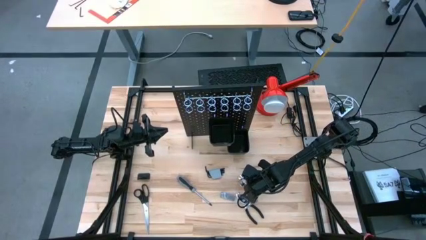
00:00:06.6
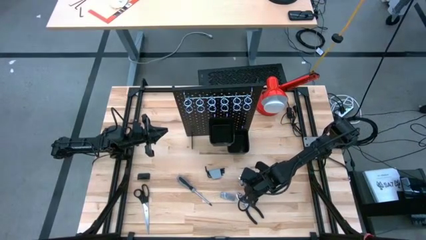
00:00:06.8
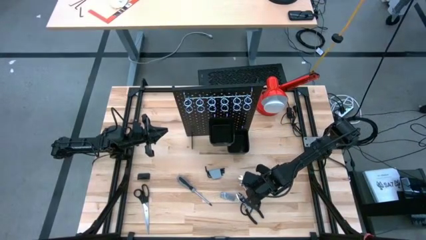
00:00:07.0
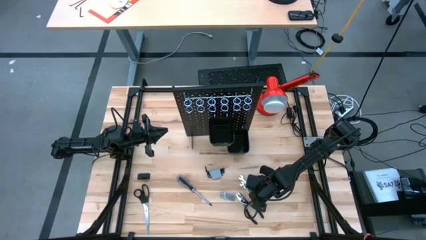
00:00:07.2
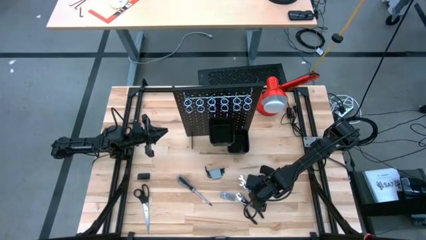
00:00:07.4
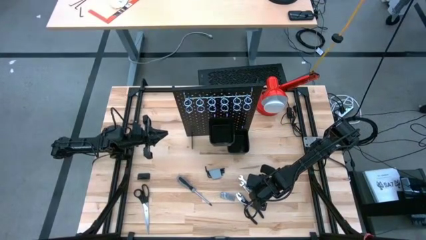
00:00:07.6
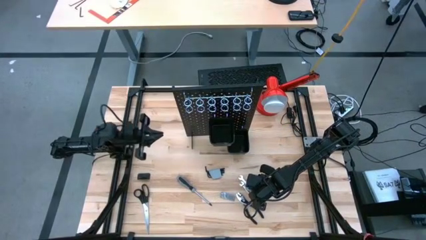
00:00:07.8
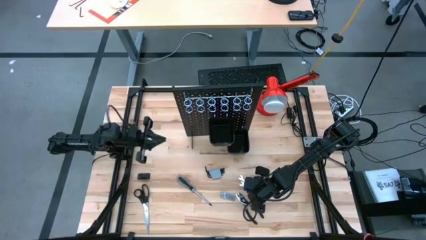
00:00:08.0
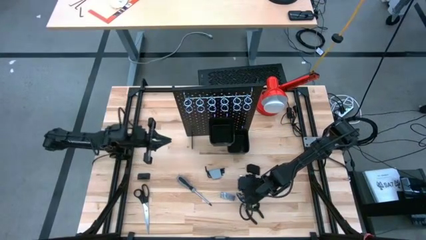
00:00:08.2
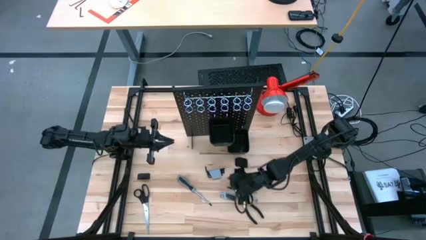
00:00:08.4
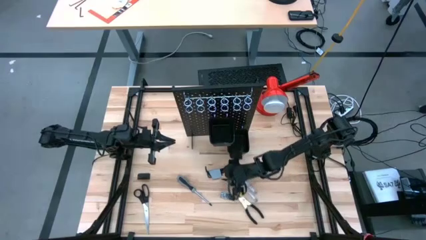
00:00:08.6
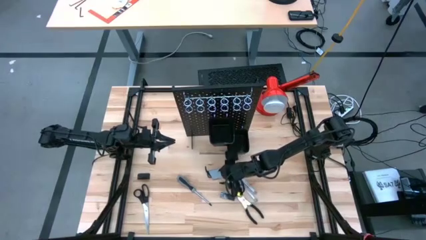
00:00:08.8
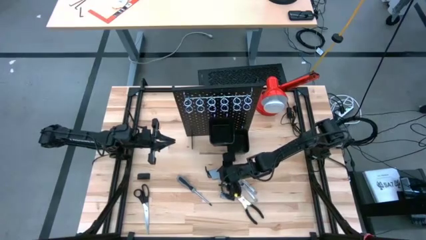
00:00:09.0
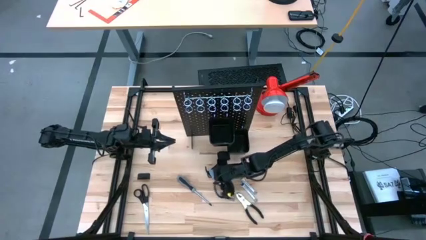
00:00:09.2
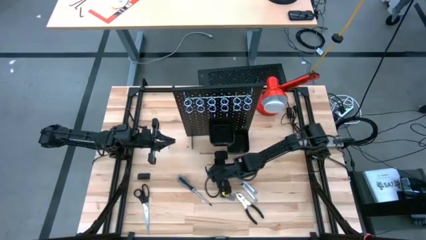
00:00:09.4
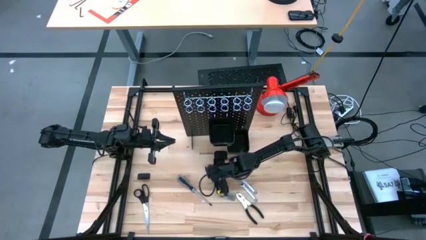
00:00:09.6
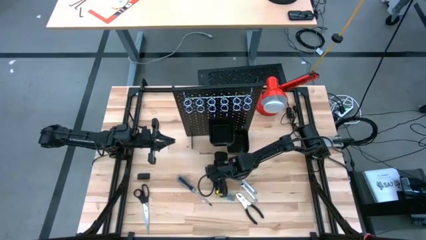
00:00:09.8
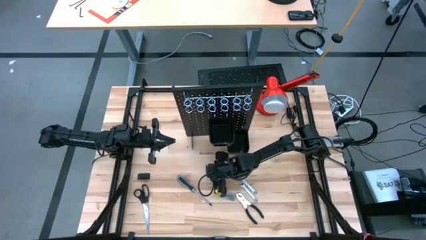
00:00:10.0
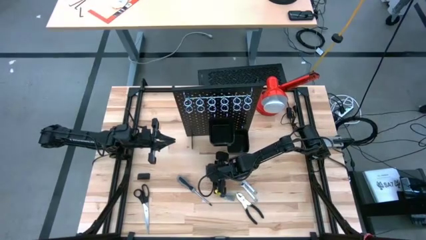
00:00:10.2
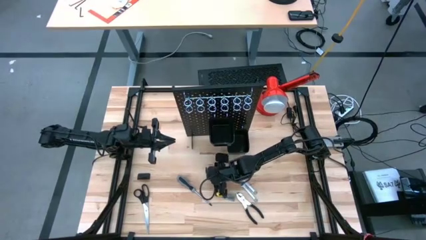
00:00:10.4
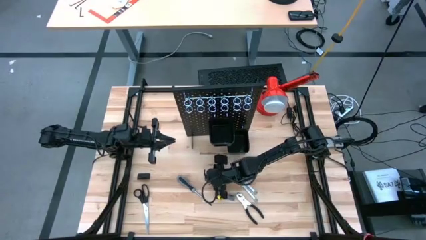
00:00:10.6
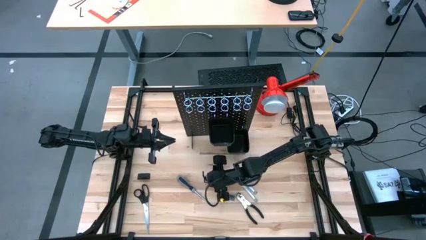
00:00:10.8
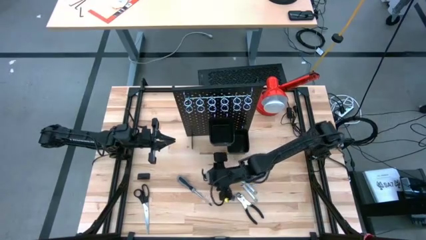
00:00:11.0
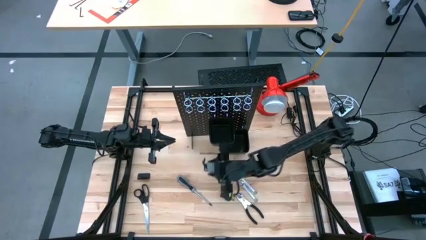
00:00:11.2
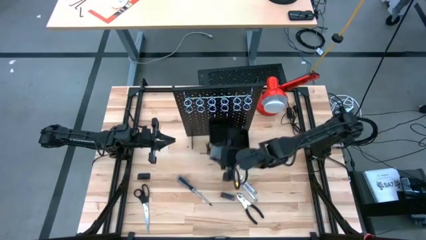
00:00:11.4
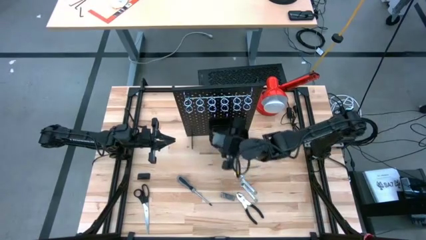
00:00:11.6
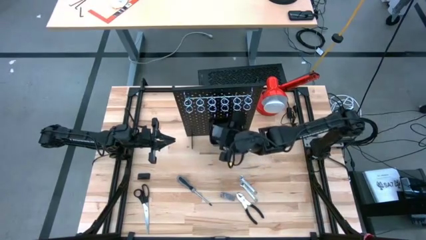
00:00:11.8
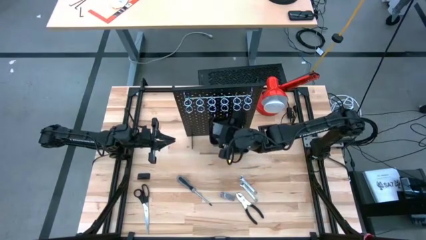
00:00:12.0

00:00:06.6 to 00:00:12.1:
Task: Hang tools onto peg board
Put the allen wrench into the black bin on the pegboard

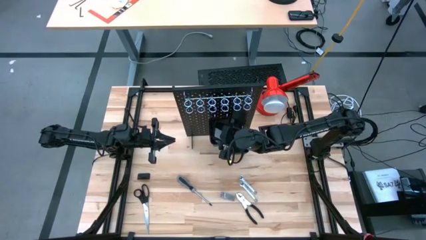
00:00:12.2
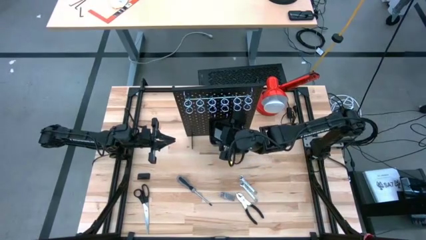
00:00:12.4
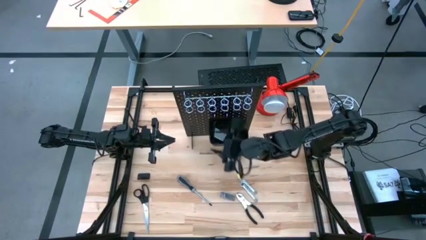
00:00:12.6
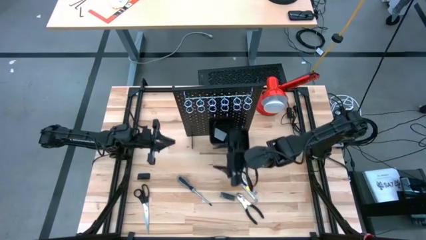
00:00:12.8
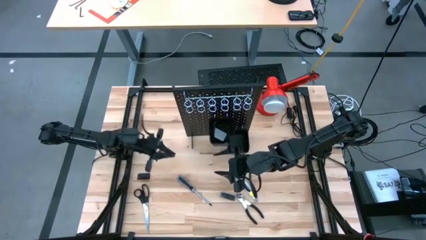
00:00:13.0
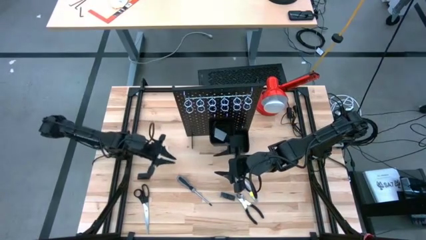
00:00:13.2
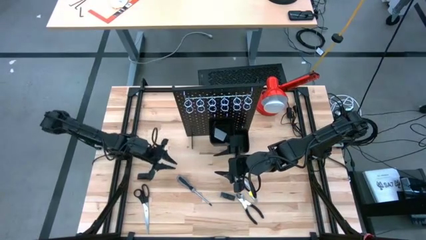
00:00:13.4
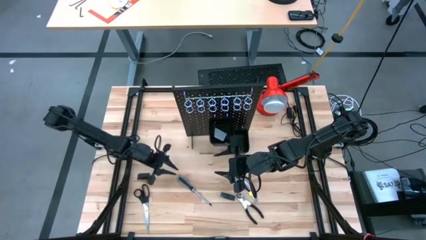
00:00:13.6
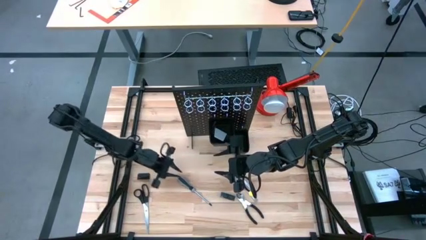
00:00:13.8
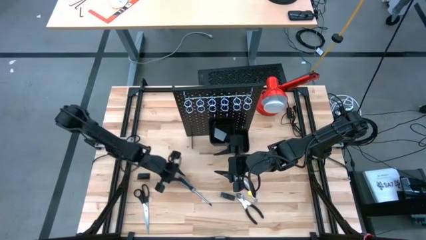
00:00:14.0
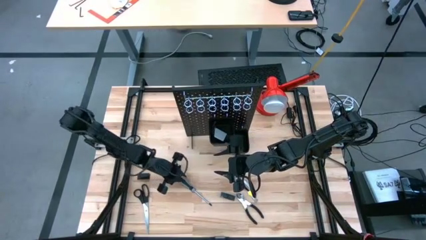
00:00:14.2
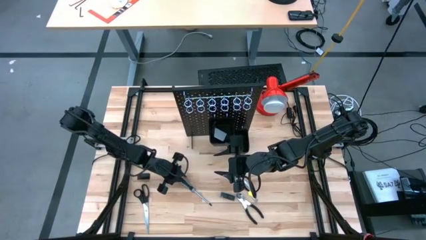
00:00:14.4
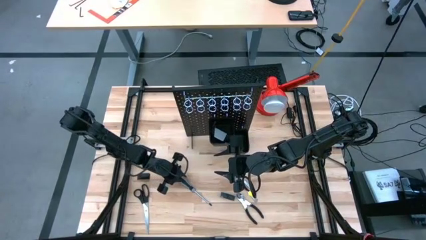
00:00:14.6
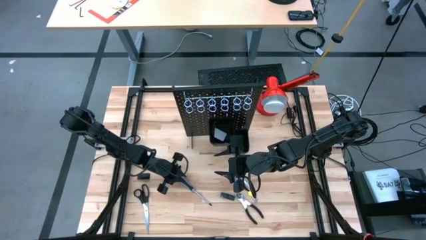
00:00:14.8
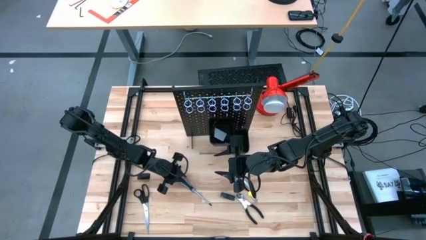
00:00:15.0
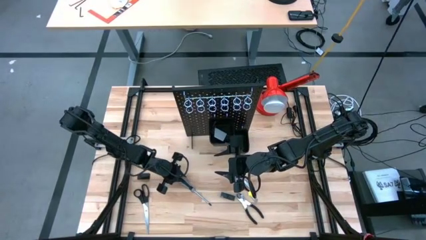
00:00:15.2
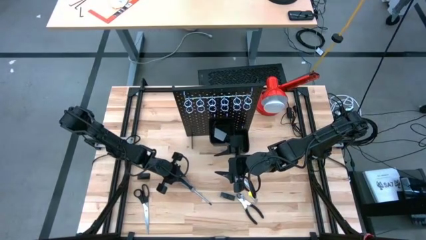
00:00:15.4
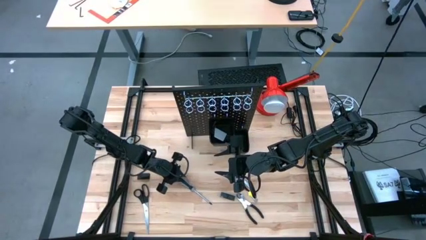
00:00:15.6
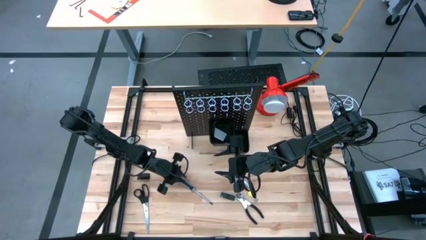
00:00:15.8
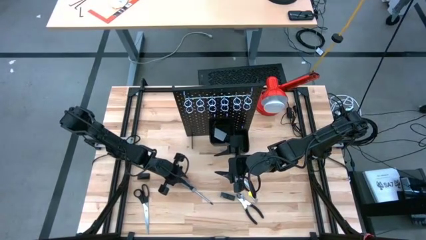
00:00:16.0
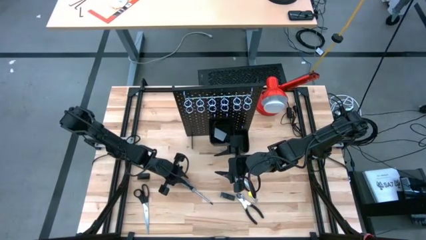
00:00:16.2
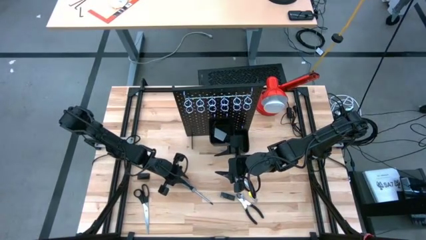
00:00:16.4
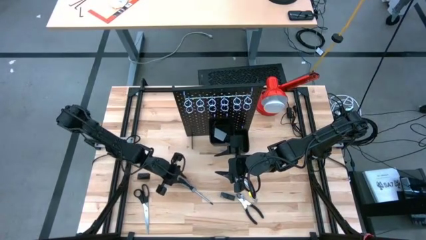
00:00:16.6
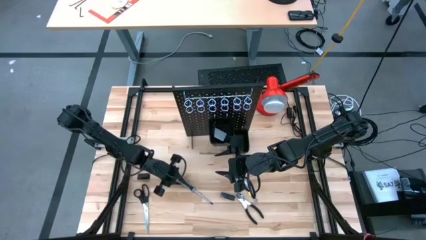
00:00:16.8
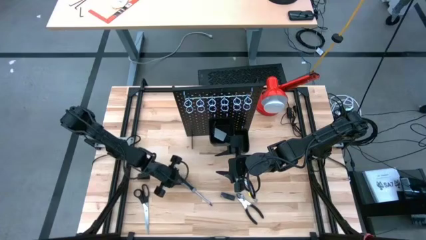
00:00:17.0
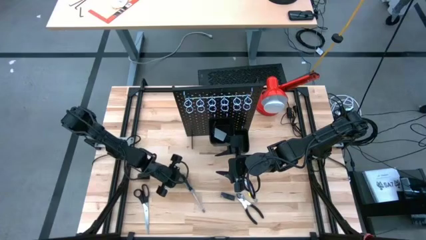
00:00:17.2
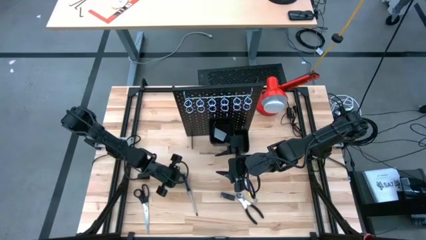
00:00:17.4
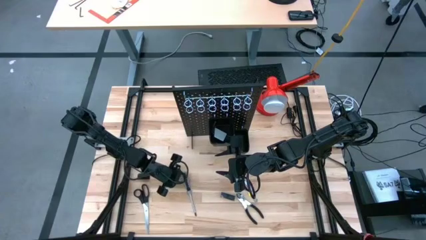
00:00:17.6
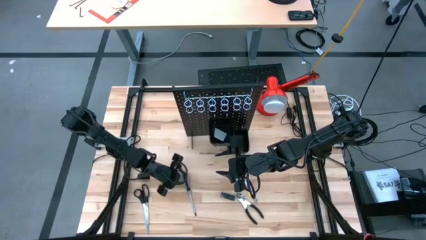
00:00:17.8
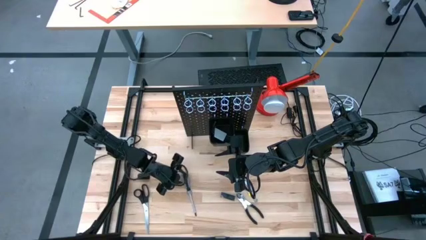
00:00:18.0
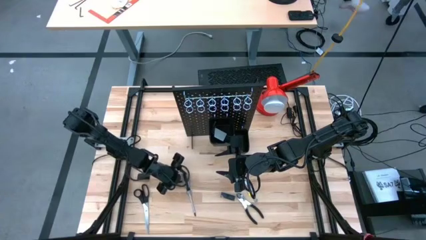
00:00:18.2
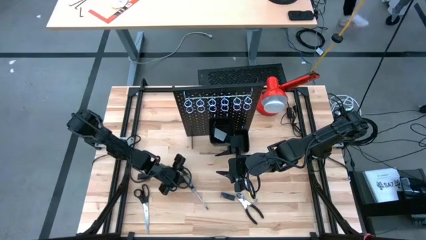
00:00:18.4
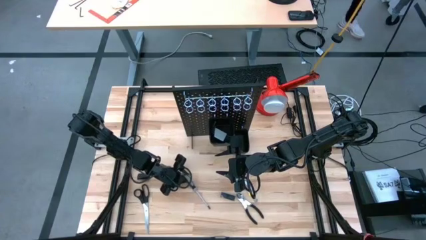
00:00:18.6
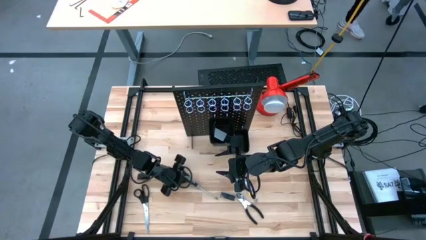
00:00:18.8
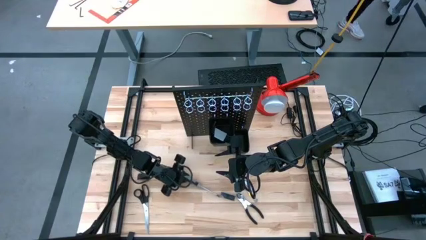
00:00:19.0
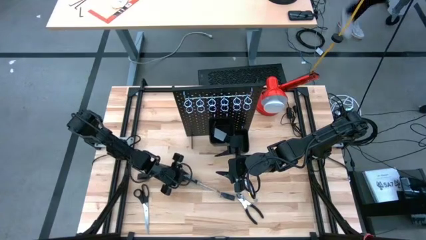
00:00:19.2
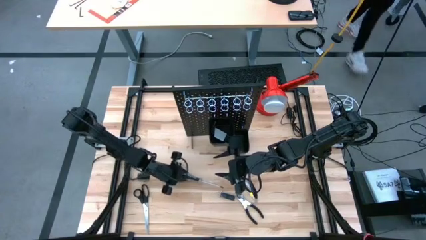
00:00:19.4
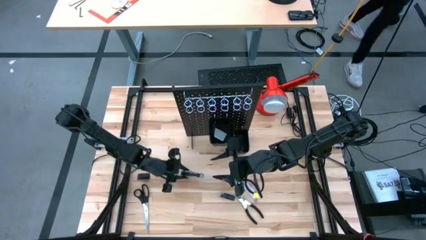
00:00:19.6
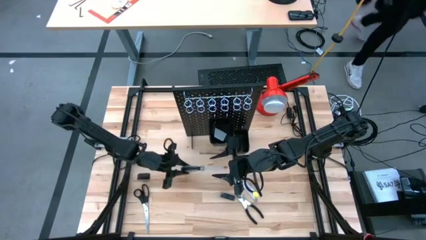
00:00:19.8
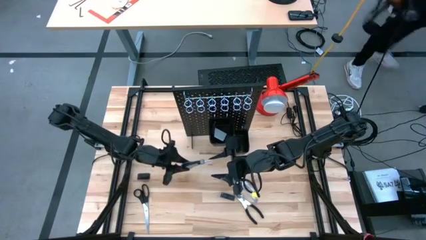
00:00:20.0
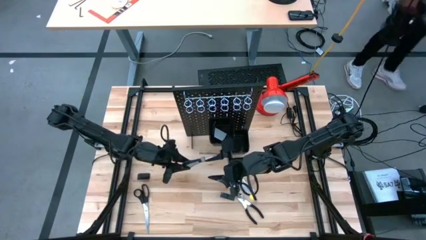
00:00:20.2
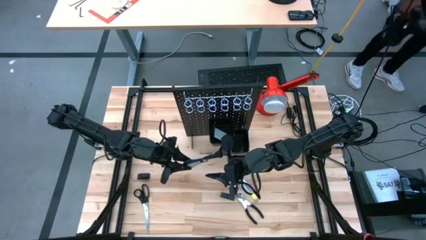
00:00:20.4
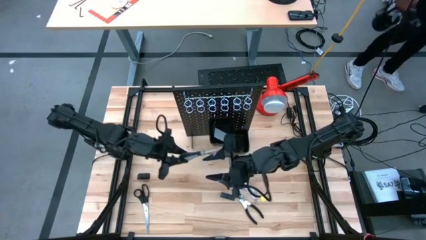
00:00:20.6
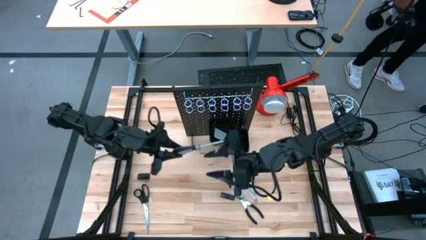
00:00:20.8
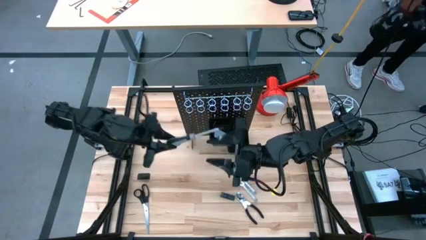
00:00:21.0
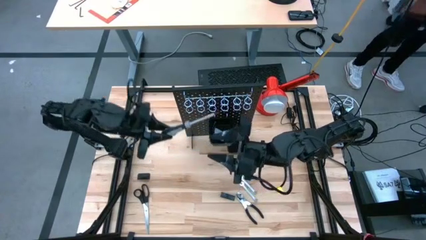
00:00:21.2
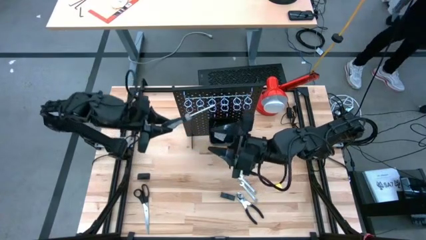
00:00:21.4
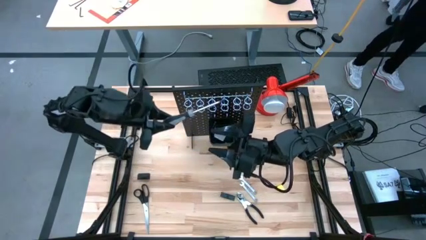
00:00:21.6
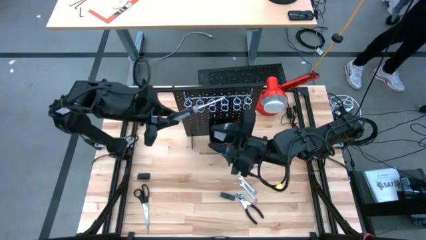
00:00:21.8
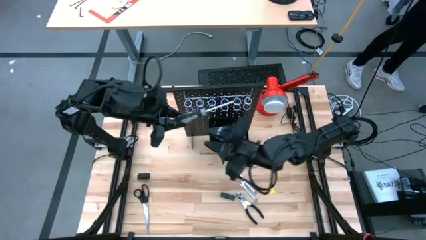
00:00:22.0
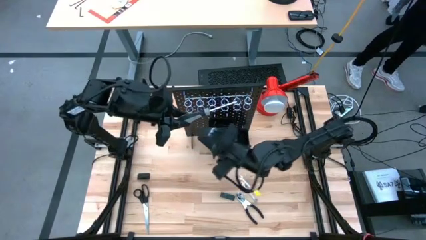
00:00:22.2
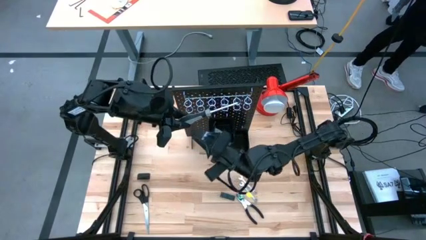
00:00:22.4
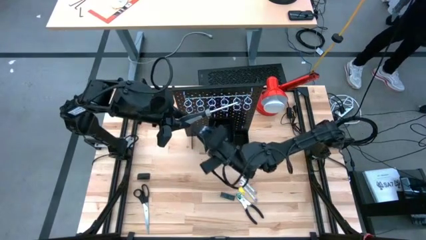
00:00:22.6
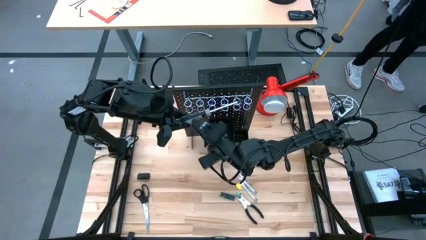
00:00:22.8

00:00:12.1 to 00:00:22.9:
Hang the screwdriver on the pegboard
